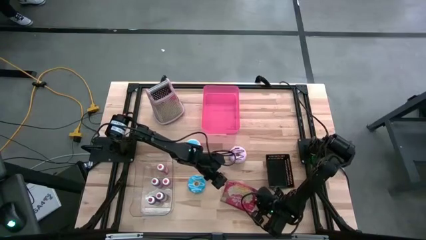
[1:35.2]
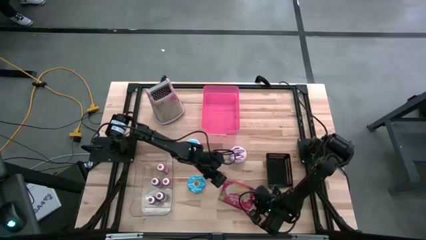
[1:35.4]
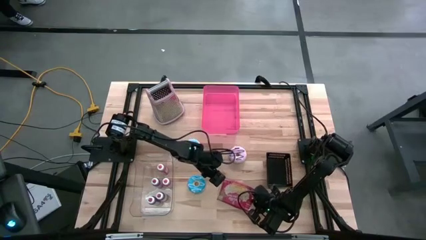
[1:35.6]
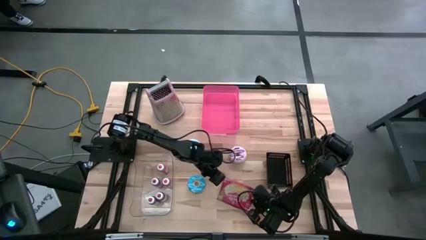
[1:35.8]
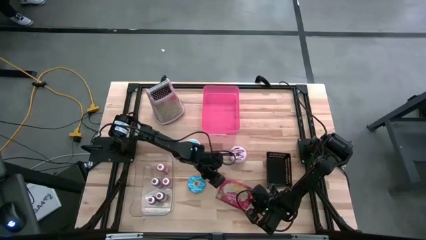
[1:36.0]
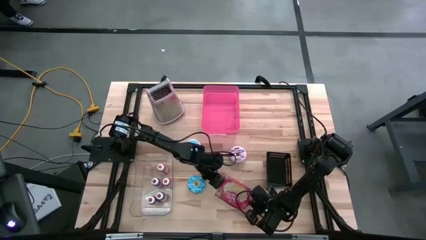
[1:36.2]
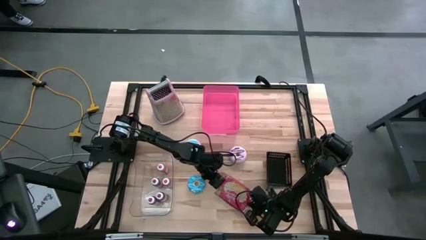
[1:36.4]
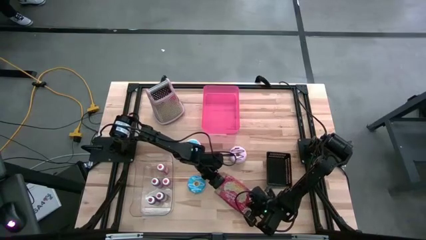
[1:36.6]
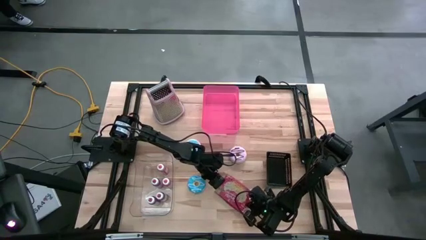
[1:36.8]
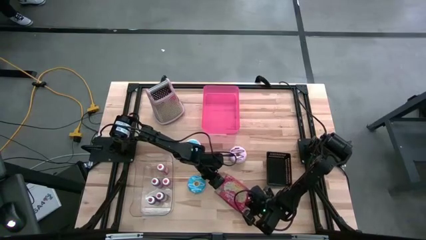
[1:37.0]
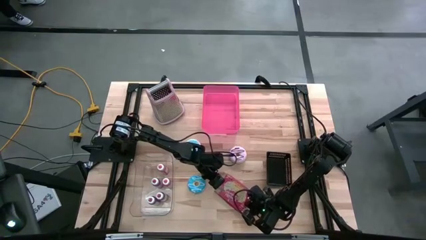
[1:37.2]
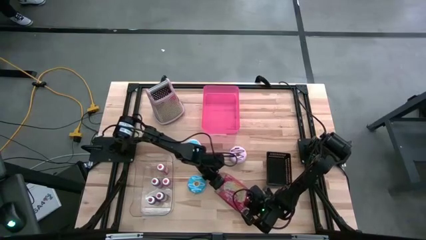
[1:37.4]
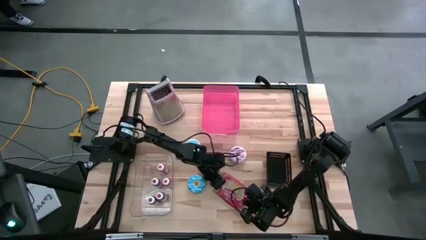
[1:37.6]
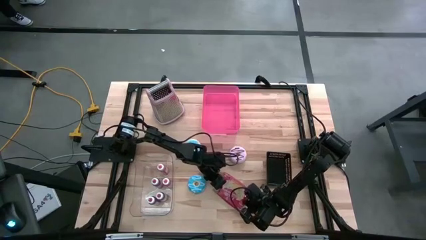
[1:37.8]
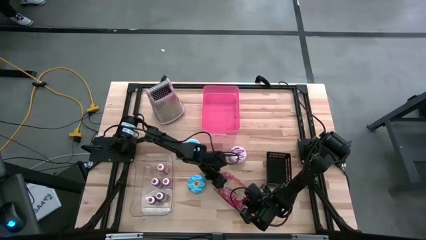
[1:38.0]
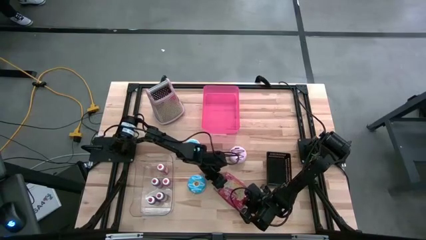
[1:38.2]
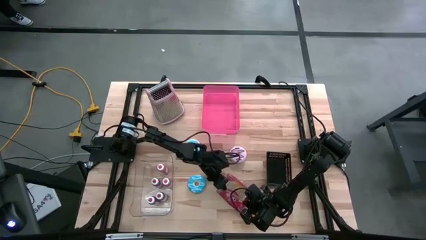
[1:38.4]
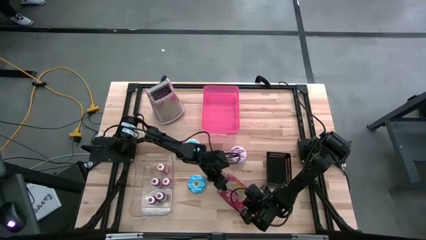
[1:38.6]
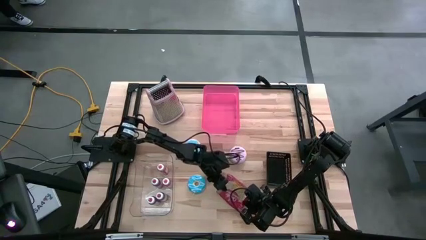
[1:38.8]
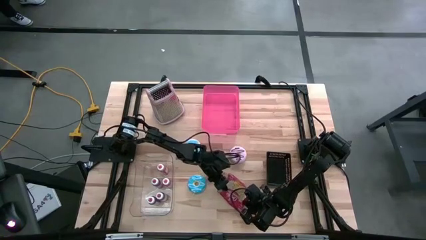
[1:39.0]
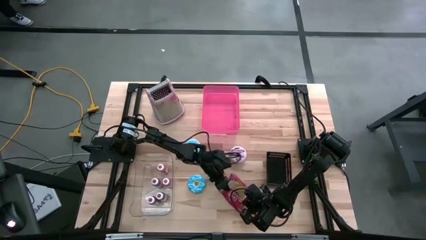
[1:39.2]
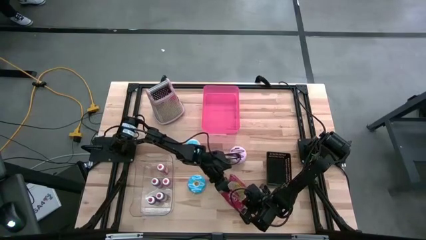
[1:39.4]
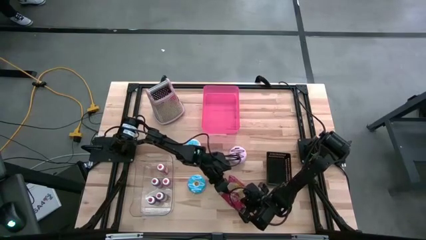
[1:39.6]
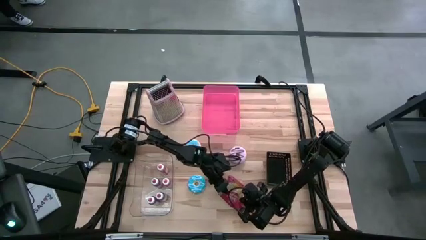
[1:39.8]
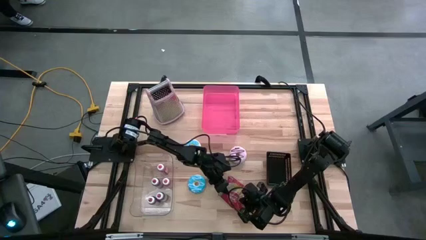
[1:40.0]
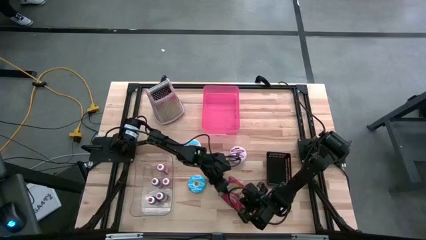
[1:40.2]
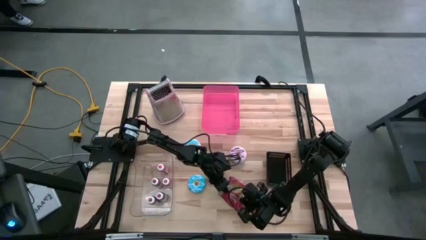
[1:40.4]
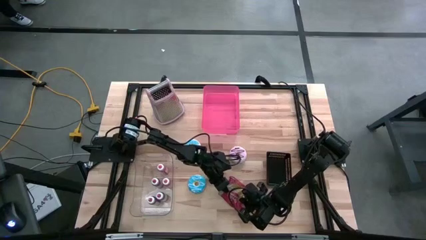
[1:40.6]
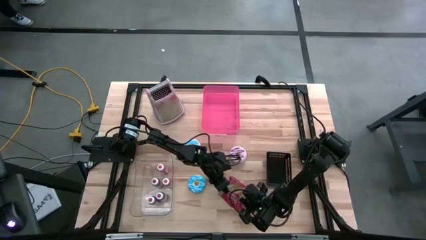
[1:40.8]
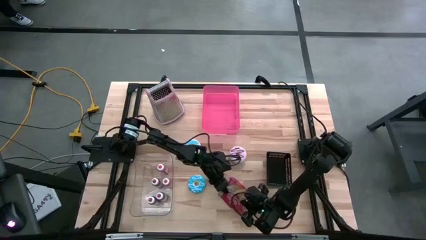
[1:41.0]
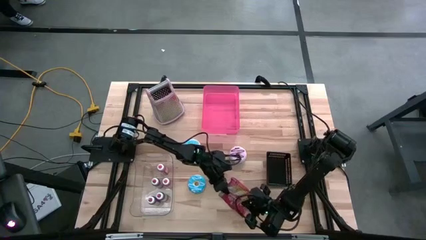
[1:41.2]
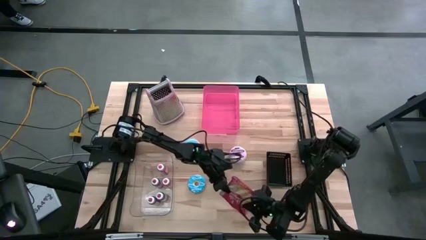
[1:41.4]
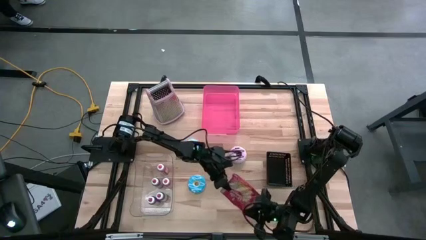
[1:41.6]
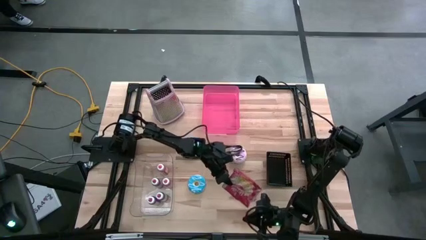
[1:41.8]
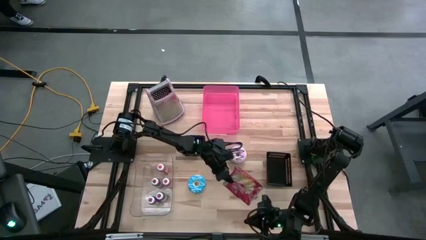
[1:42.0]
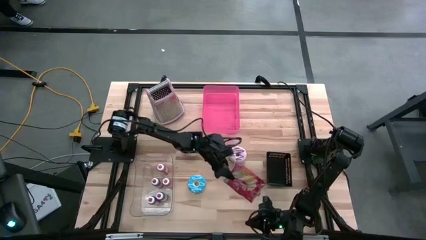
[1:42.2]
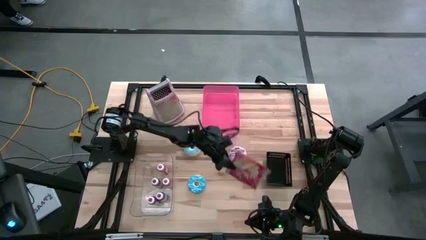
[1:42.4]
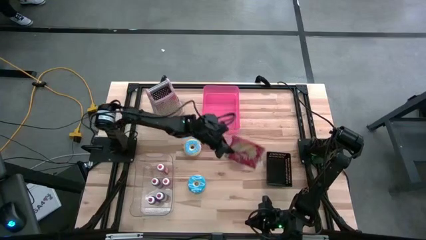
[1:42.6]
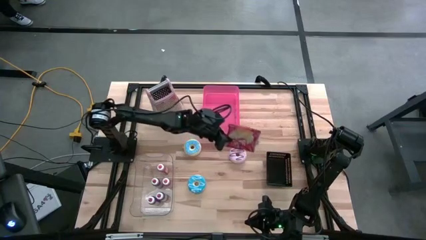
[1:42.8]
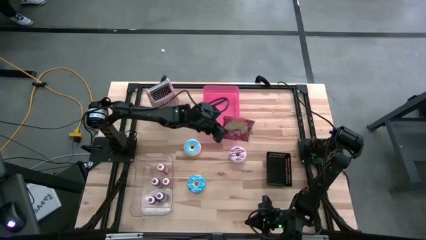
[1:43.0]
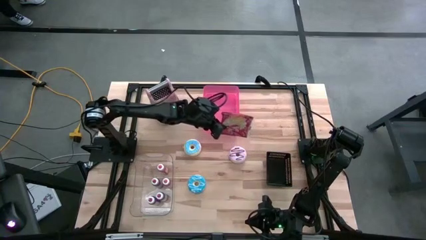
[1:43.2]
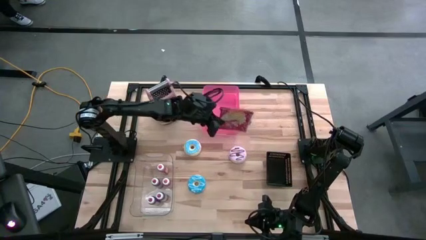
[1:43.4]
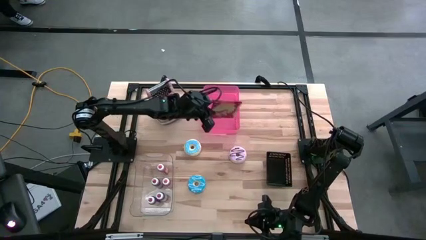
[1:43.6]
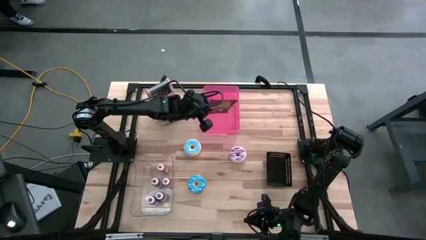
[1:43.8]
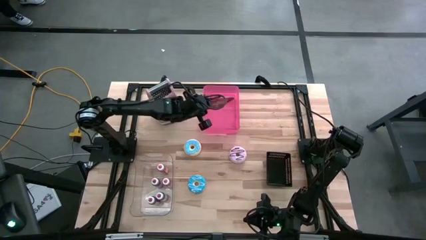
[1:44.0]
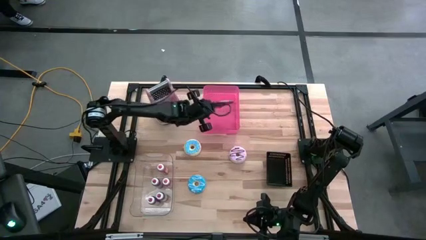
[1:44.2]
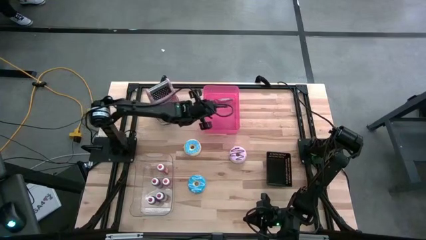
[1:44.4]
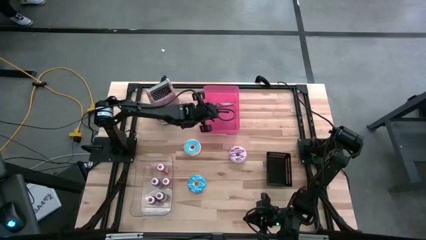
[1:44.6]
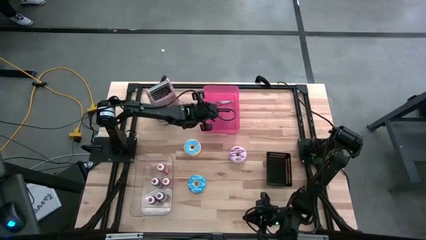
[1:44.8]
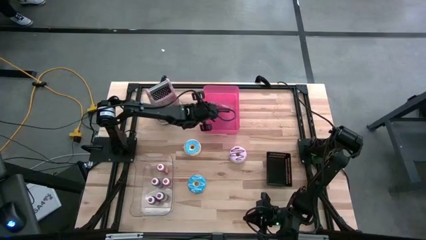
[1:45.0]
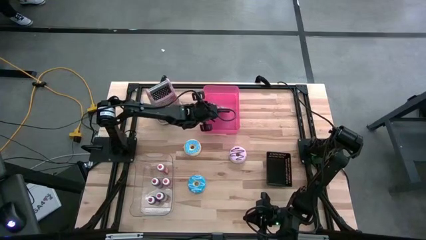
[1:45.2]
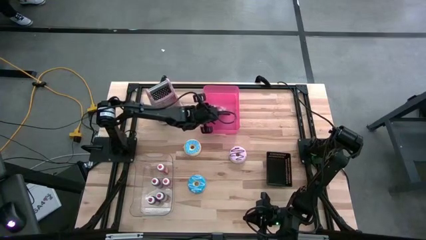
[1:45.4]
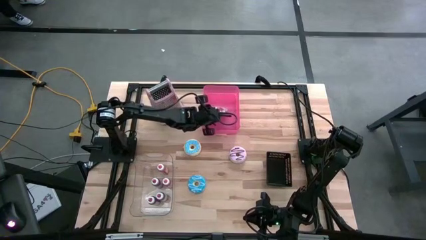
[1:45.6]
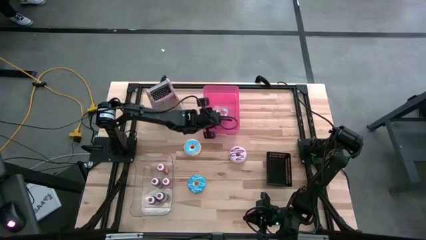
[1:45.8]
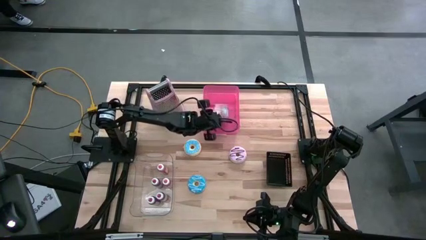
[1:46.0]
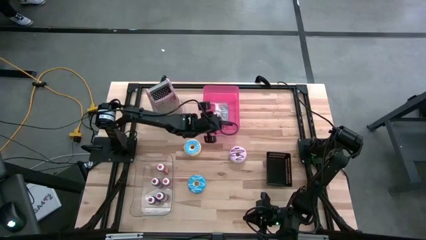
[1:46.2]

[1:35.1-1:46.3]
Put the popcorn bag into the red bin

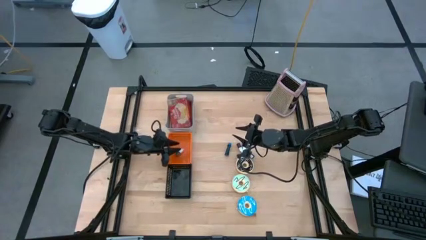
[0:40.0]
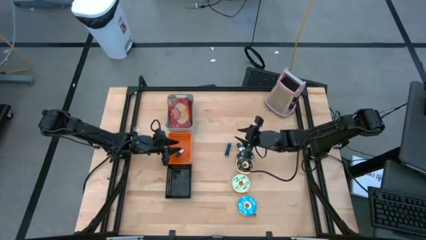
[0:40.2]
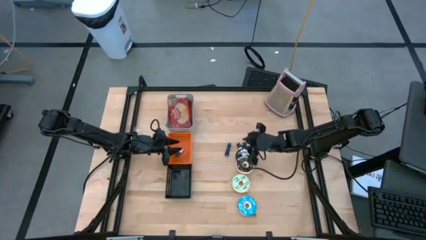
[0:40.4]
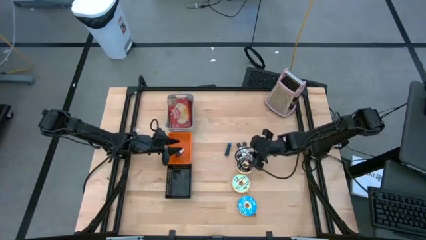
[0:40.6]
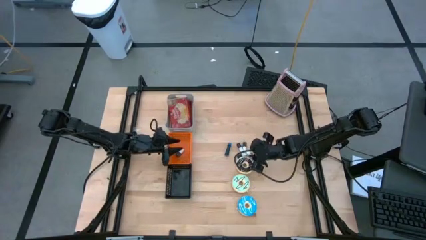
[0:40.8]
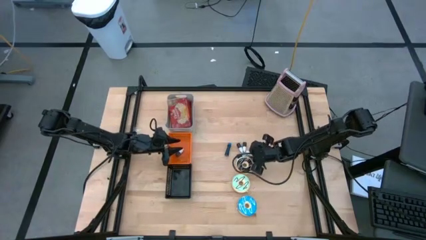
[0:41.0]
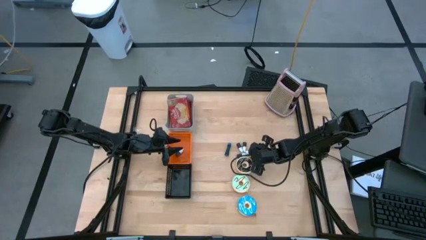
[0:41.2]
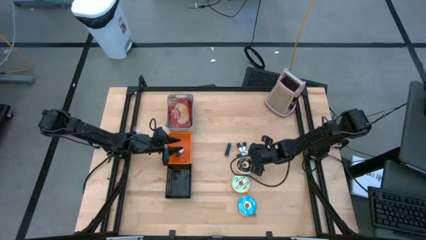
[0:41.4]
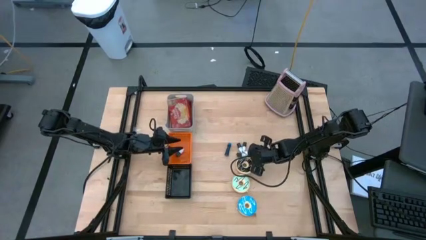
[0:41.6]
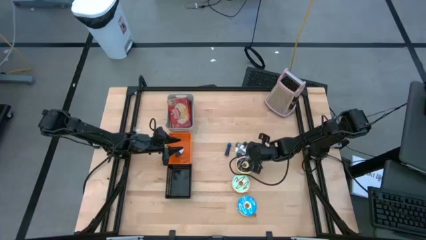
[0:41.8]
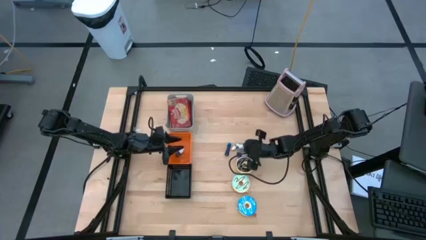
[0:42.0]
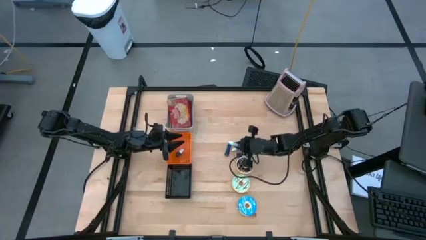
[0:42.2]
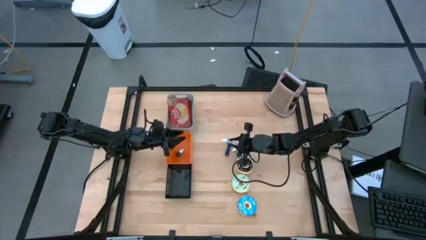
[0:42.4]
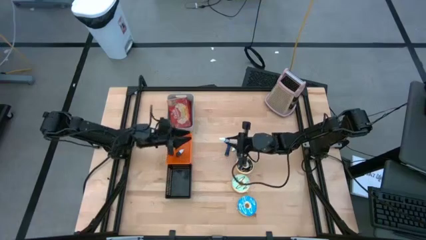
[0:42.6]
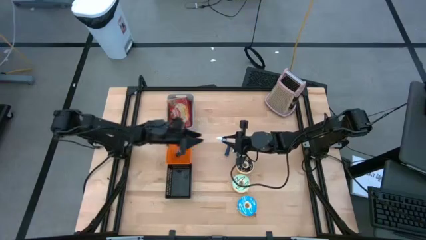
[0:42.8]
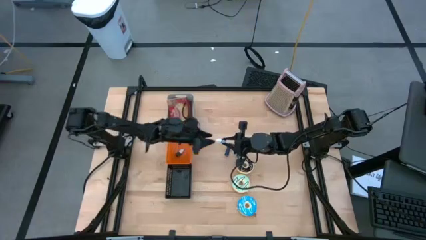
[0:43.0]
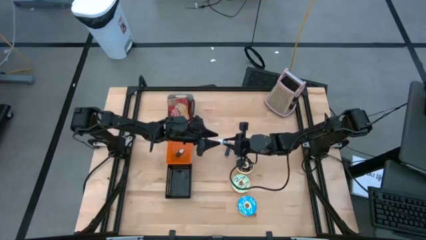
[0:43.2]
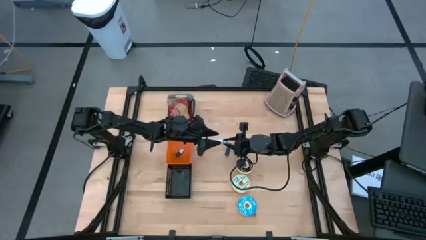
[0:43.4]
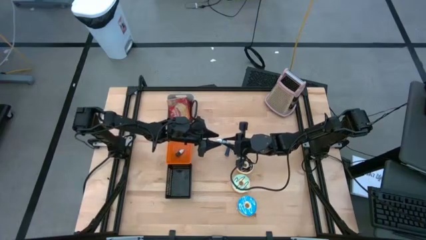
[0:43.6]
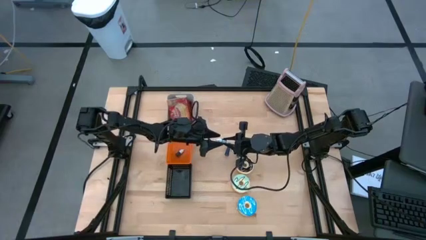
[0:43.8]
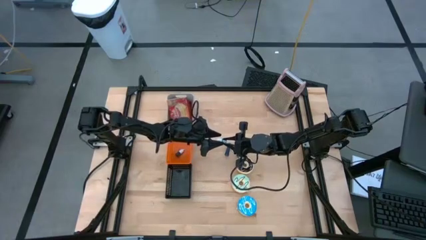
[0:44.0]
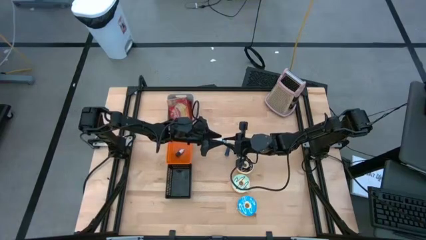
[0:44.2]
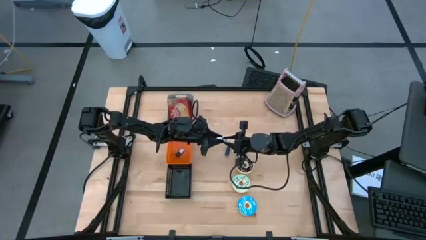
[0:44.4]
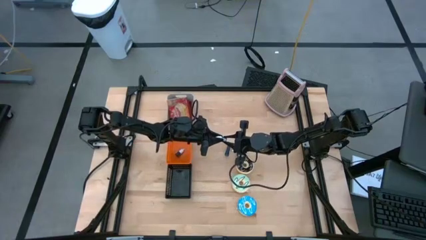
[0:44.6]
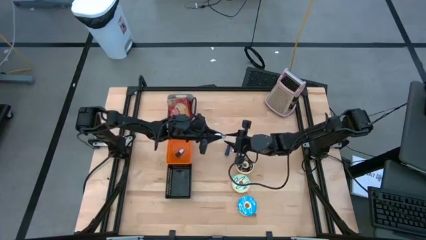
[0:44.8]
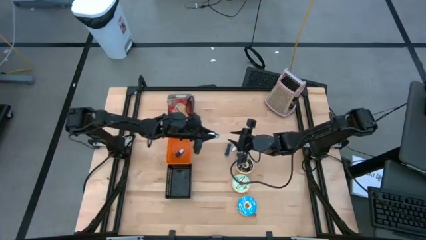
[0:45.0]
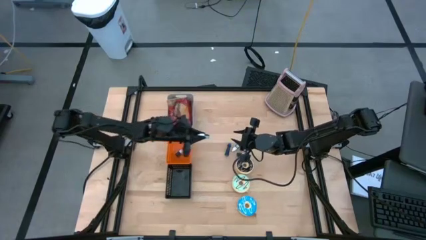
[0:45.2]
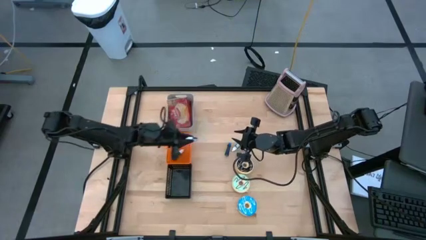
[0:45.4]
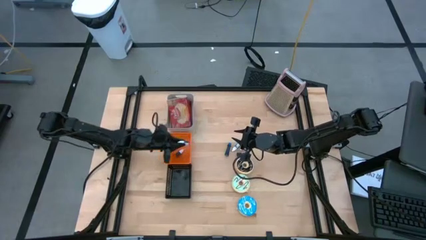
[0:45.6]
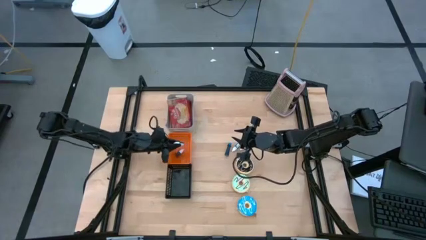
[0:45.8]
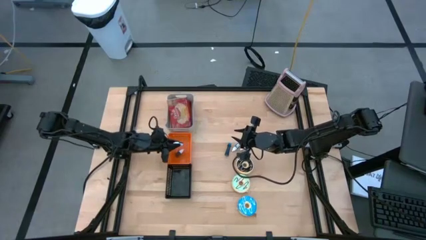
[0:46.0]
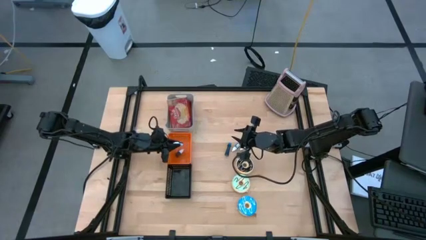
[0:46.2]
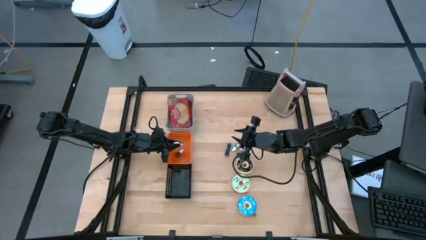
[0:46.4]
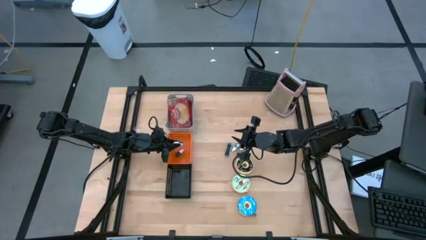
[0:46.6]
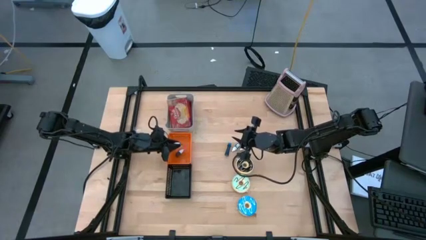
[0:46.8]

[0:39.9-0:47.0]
Put the black food coloring bottle into the orange bin
